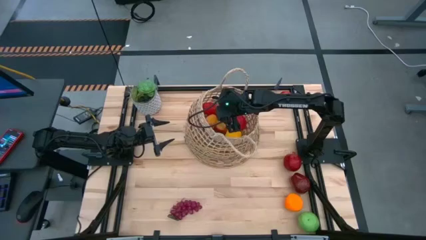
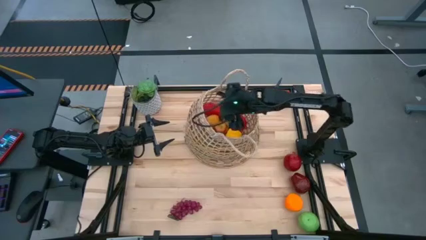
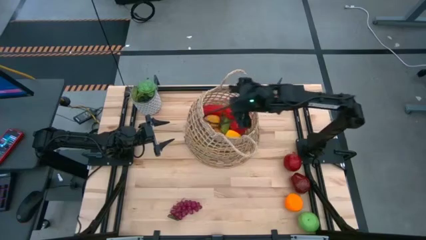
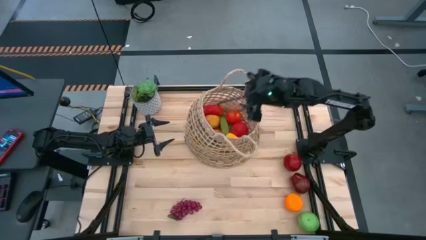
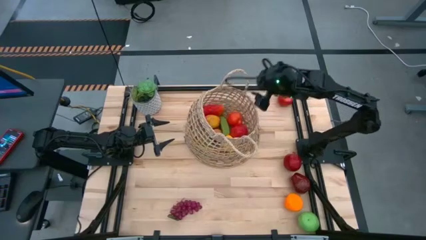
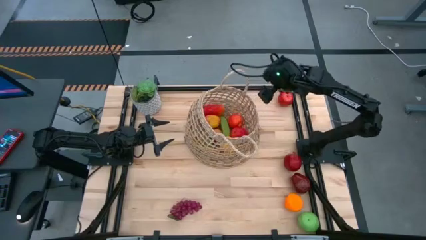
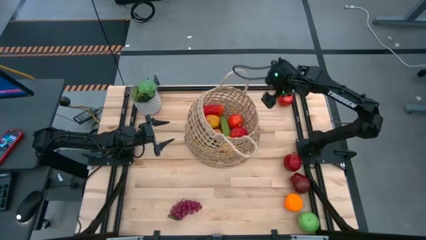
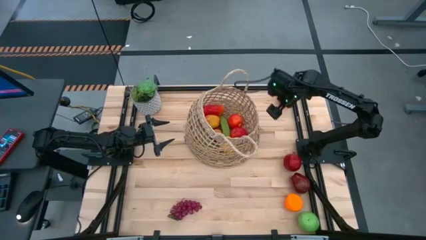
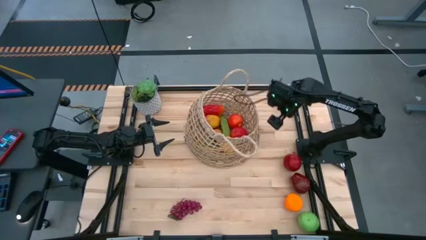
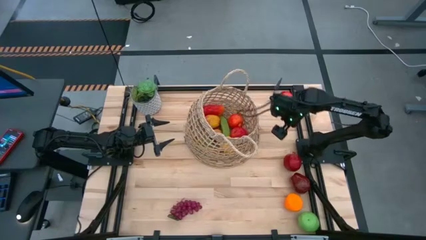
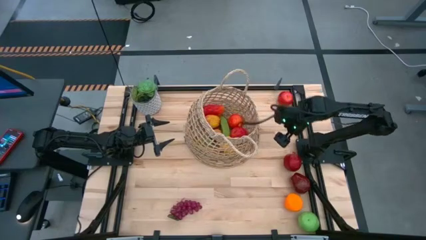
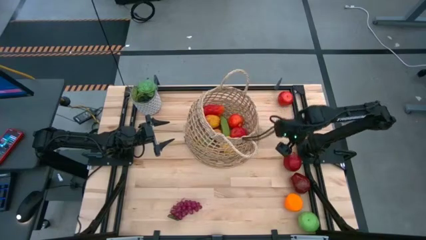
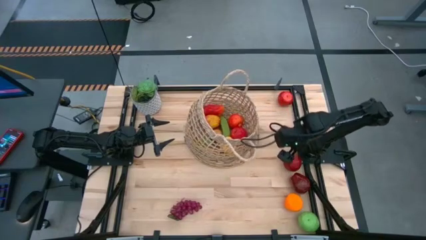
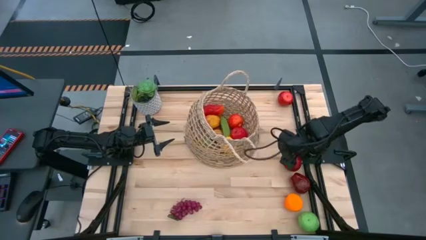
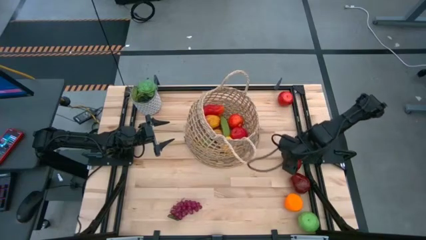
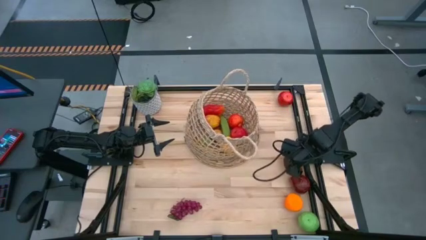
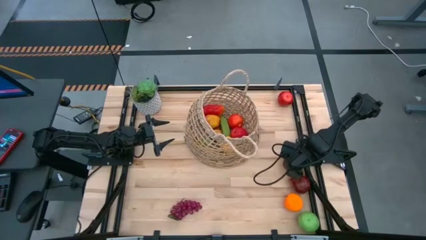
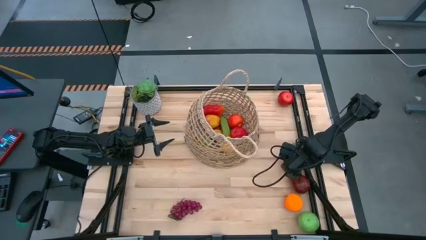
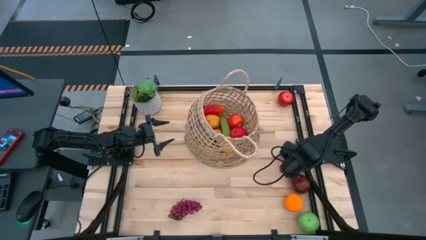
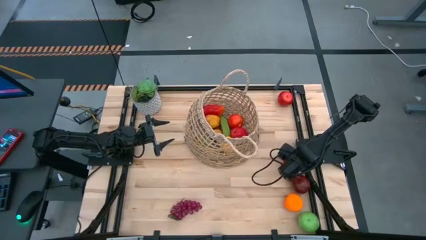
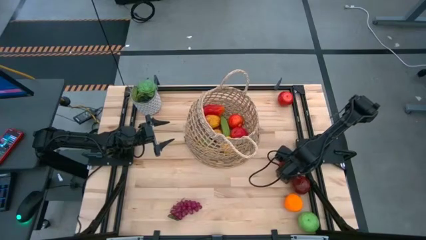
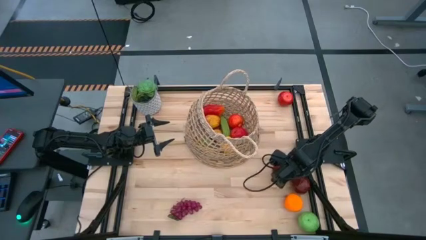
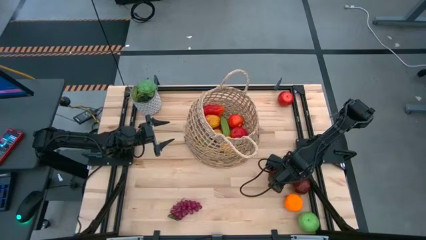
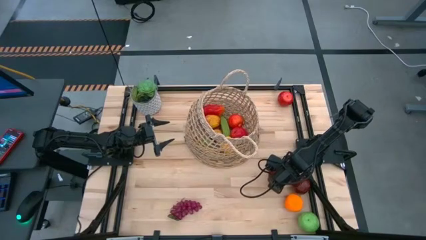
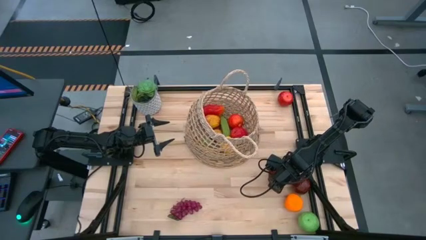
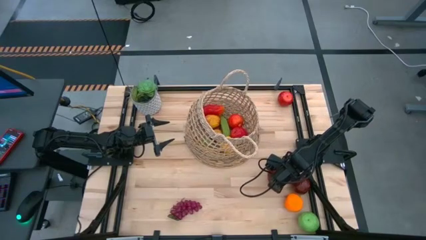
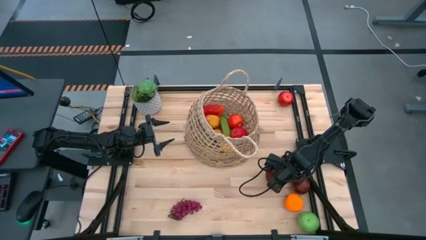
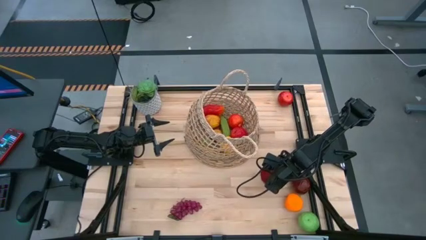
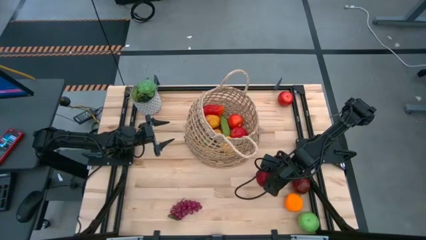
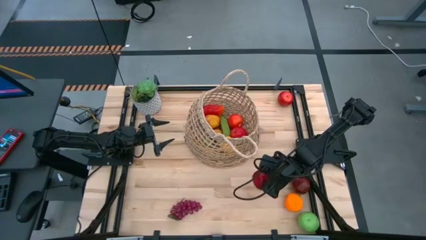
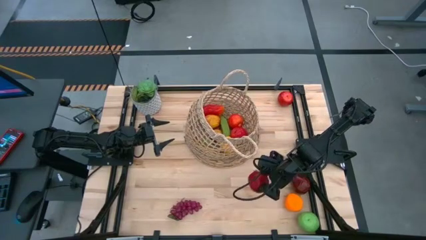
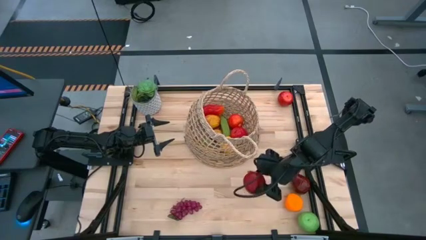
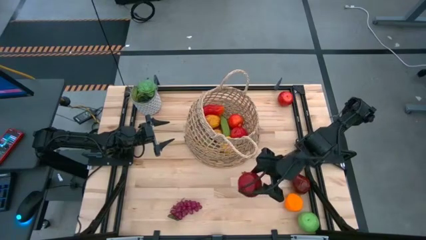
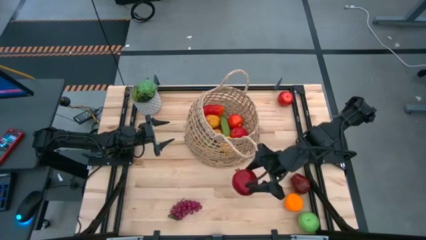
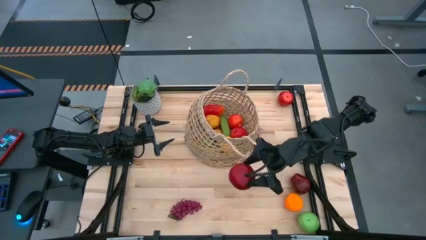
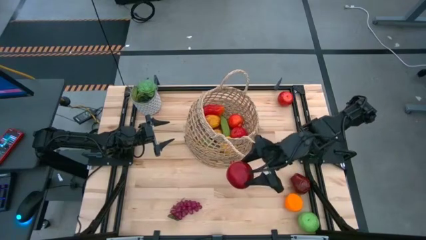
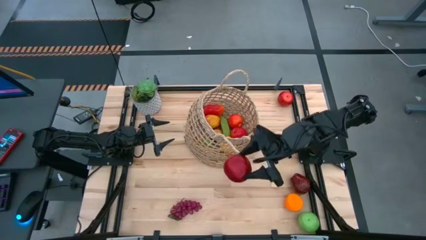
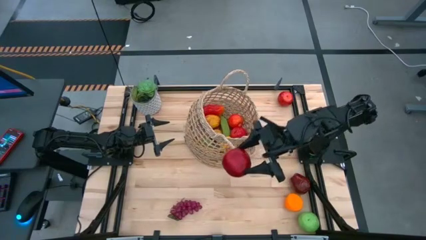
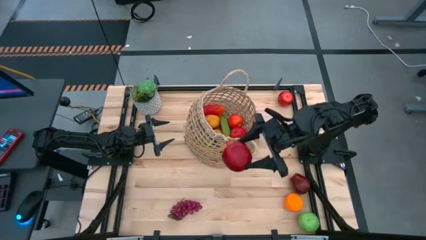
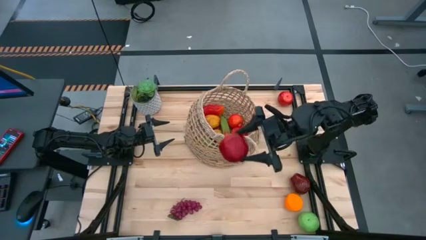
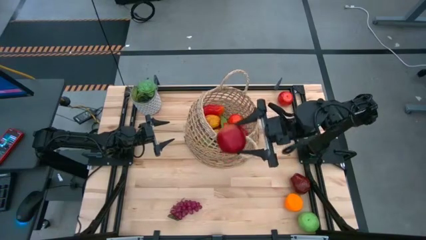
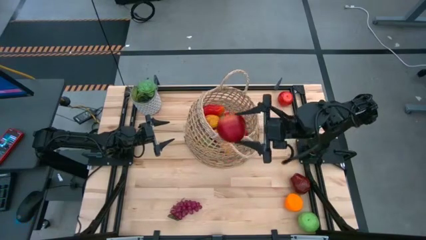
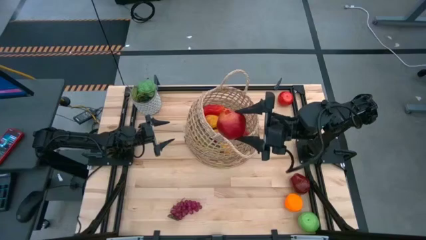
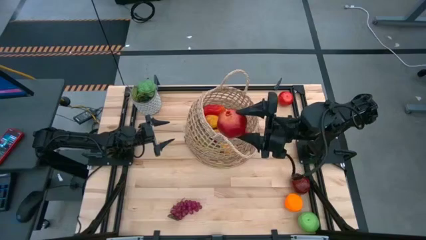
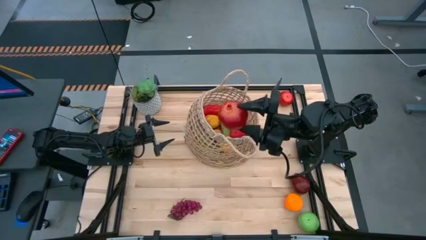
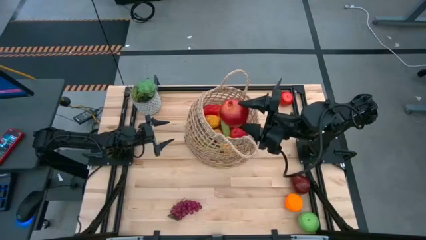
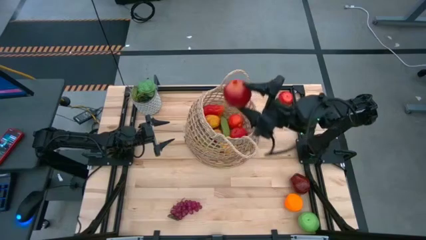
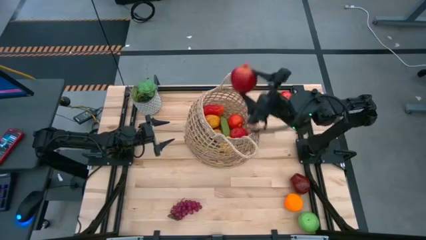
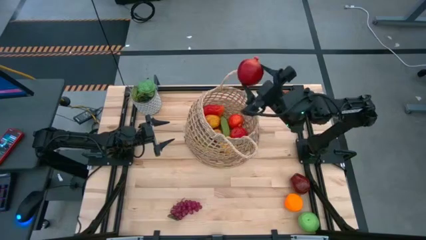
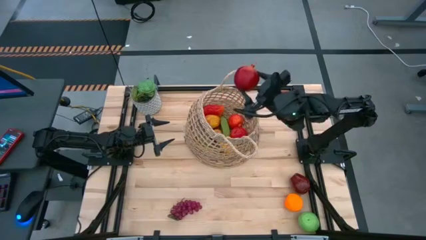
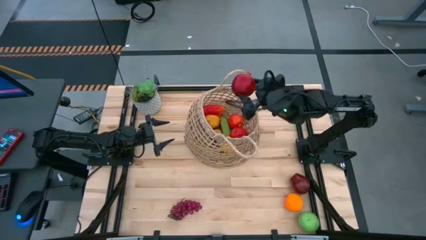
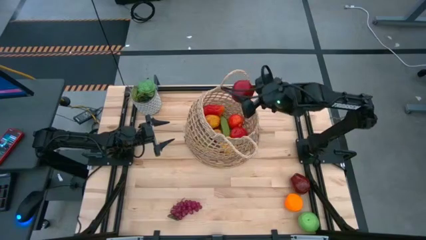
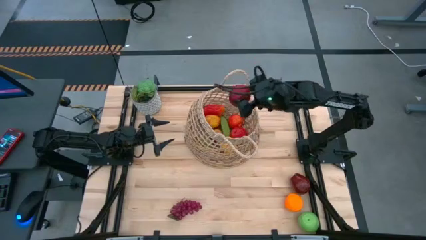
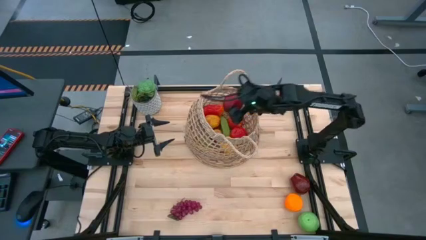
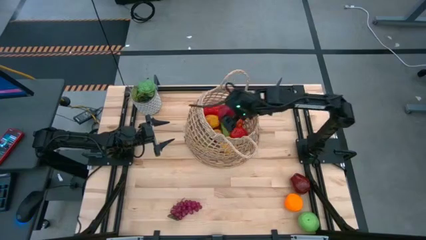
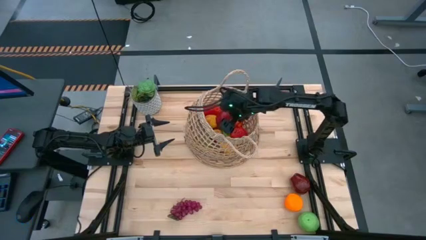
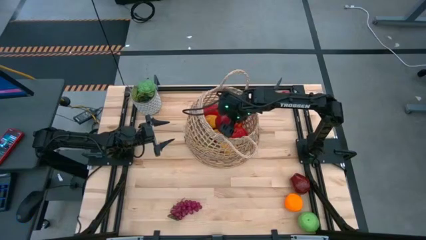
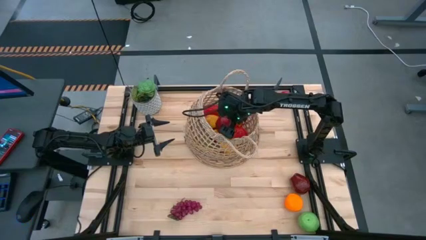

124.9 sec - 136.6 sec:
Task: Build produce basket
Put the red pomegranate into the brown basket
